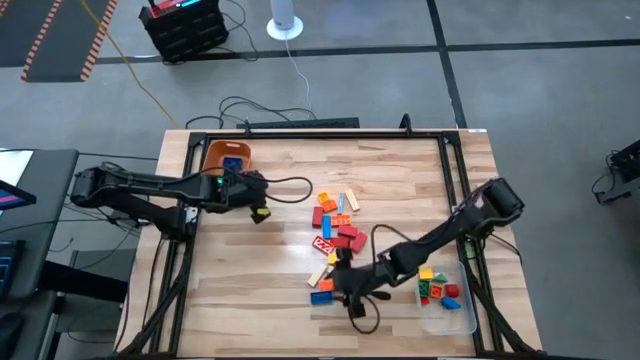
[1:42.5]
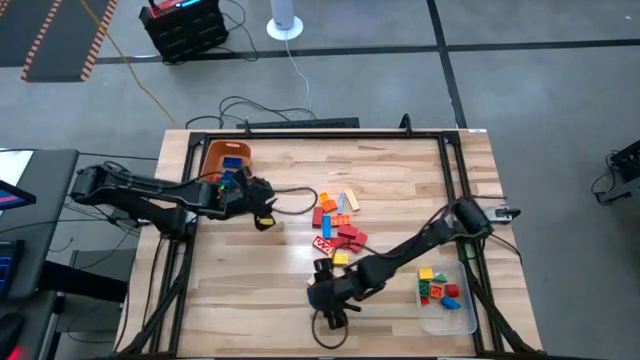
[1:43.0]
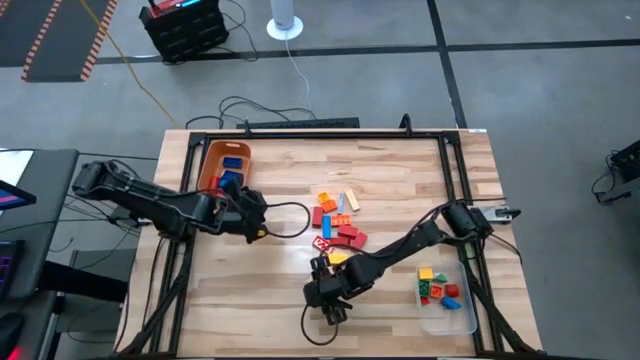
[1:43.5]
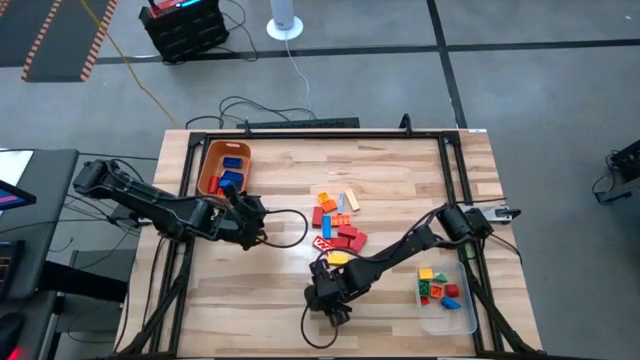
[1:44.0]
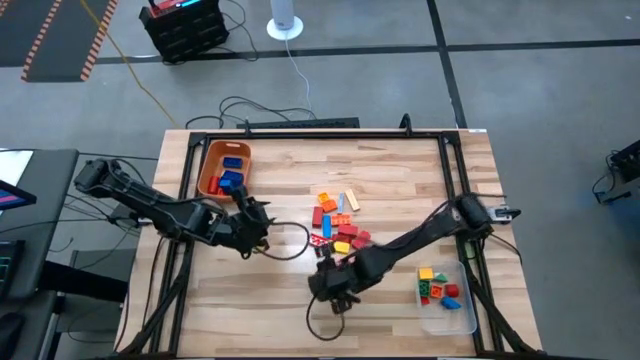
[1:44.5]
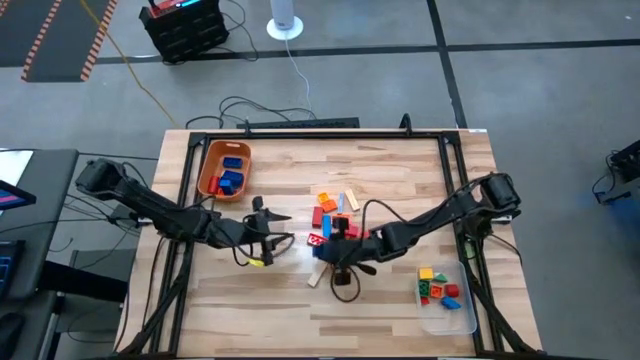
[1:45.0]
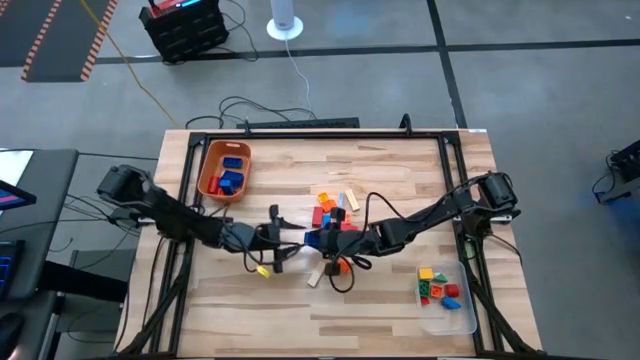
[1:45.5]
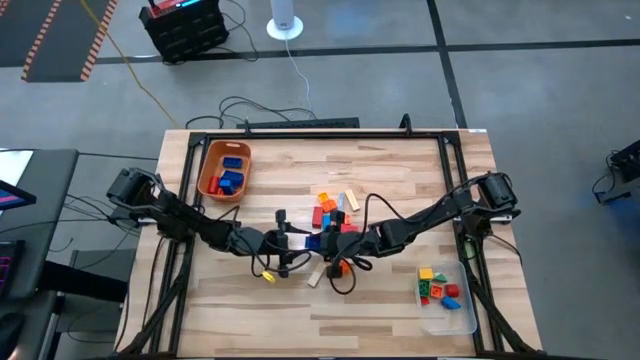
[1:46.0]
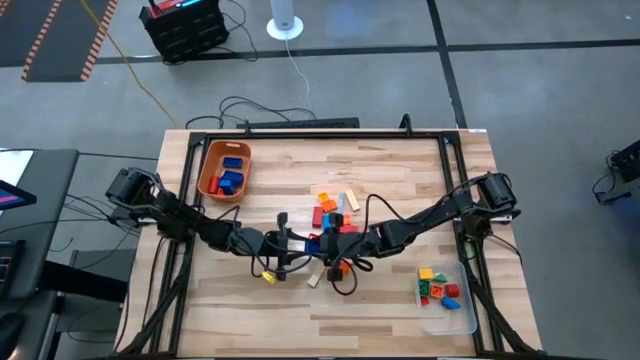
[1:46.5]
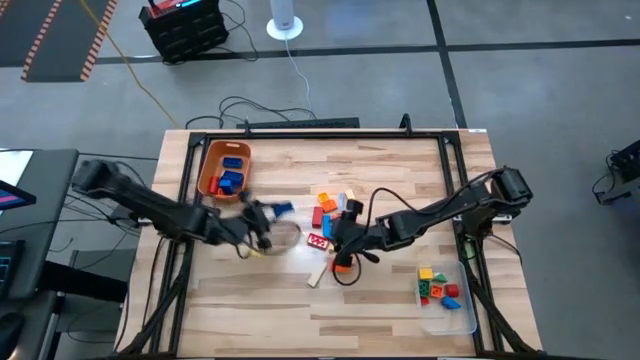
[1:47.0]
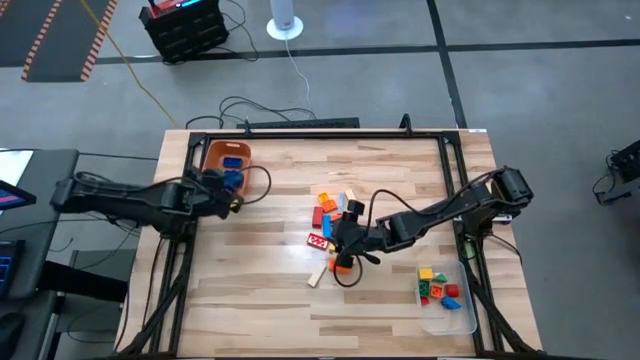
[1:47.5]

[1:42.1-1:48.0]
Task: Sort blocks by size
Put the large blue game piece into the orange bin

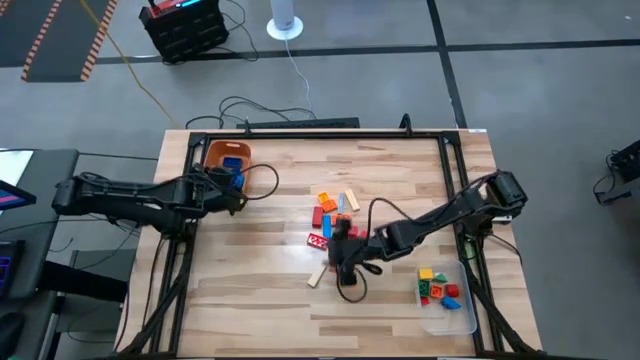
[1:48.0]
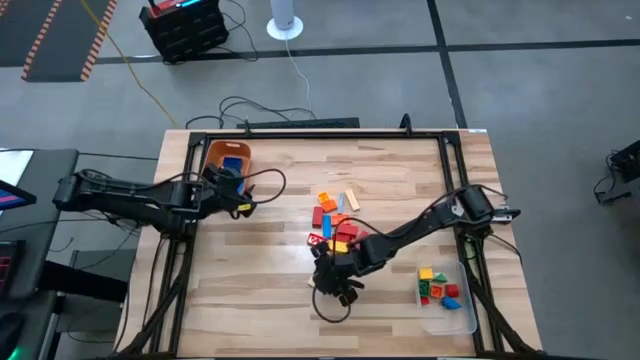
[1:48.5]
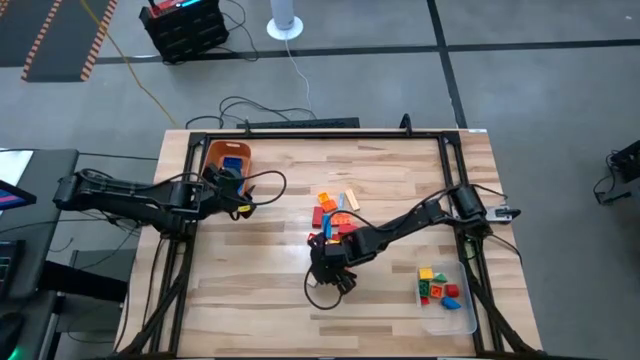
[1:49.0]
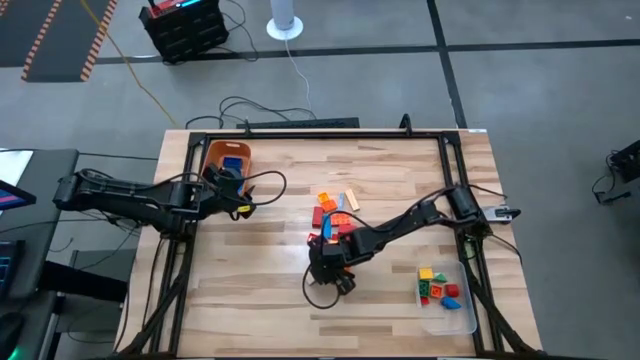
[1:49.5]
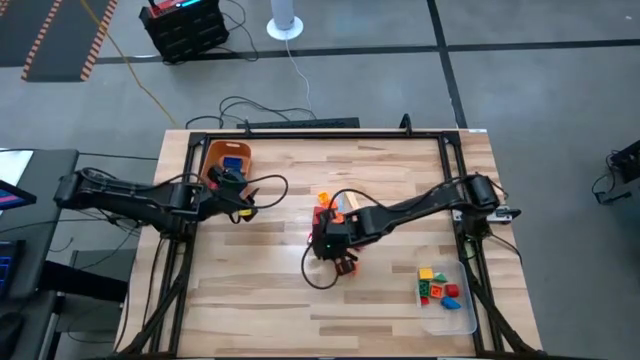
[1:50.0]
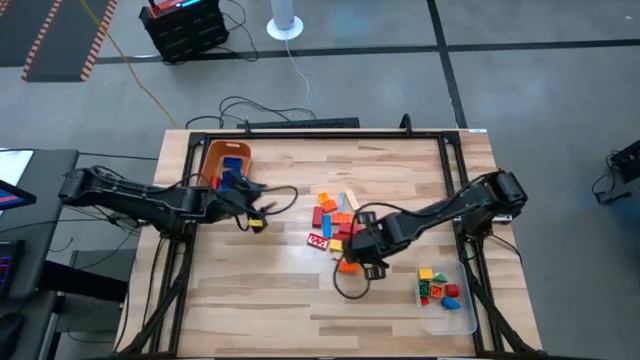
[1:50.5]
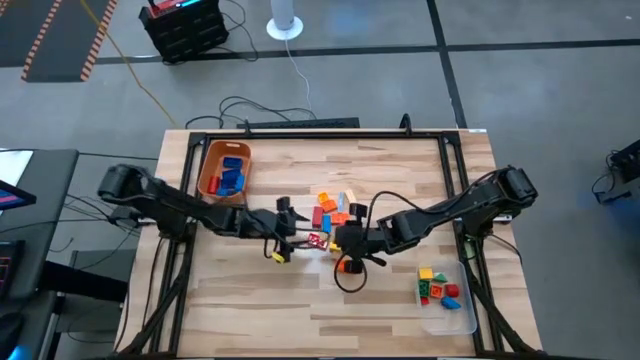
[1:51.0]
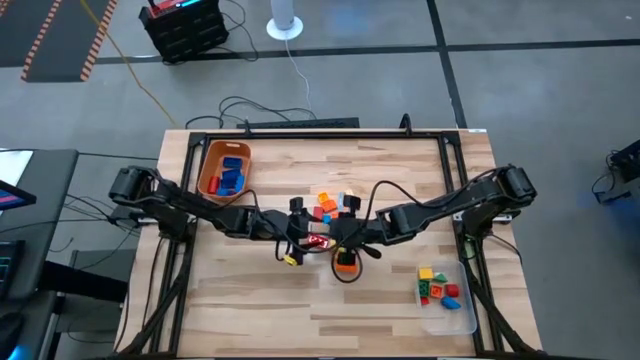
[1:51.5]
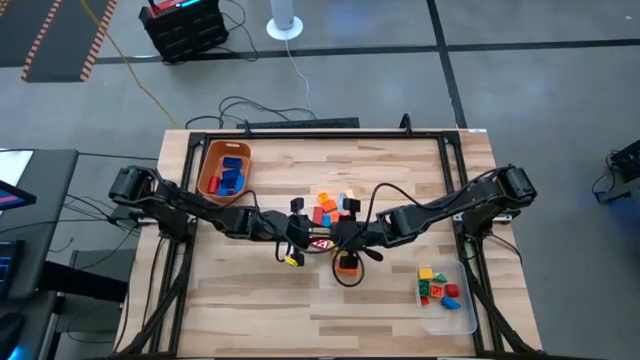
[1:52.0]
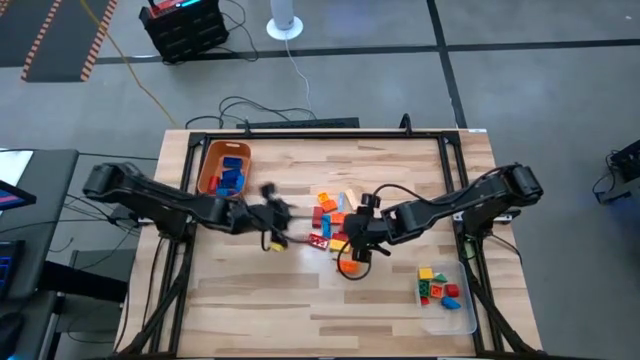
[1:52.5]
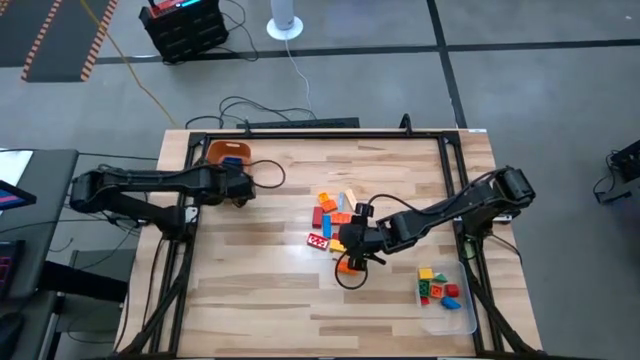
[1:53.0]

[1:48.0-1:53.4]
Put the large brown wooden block into the orange bin

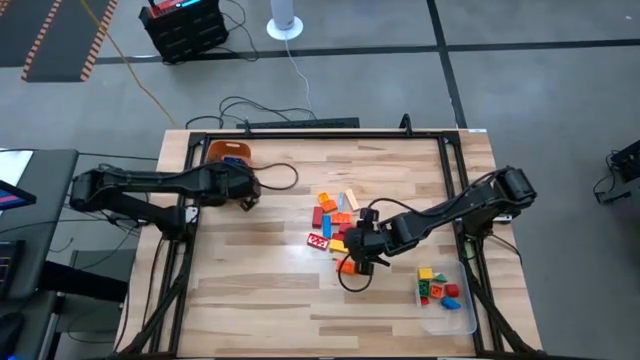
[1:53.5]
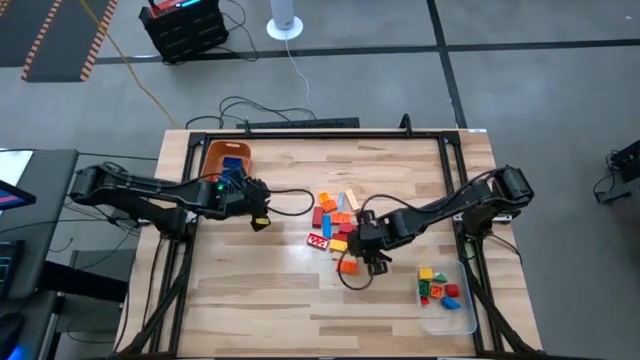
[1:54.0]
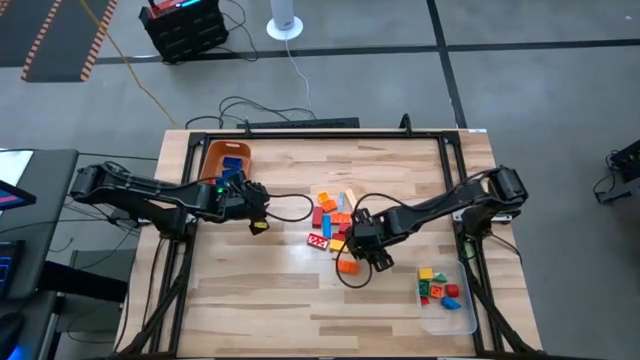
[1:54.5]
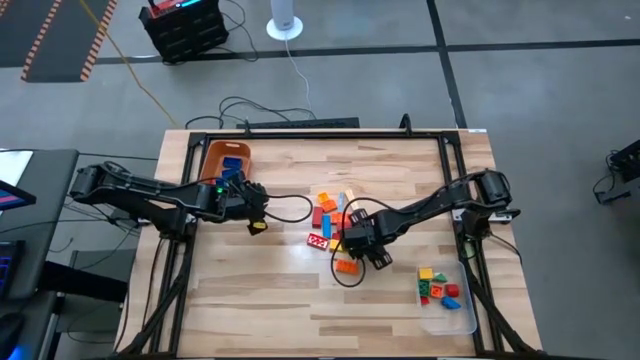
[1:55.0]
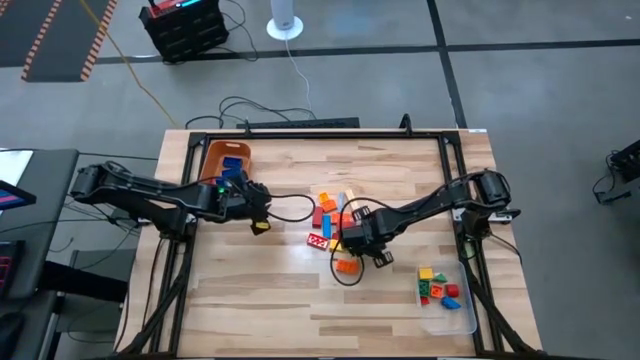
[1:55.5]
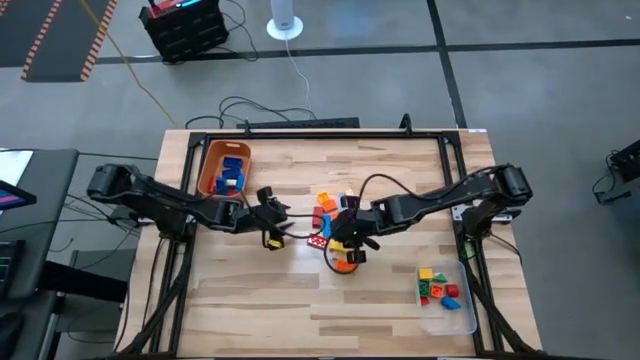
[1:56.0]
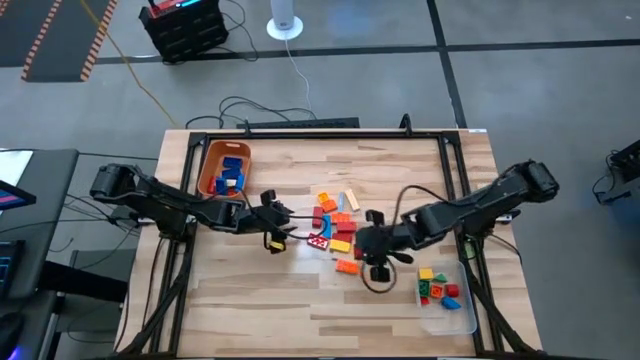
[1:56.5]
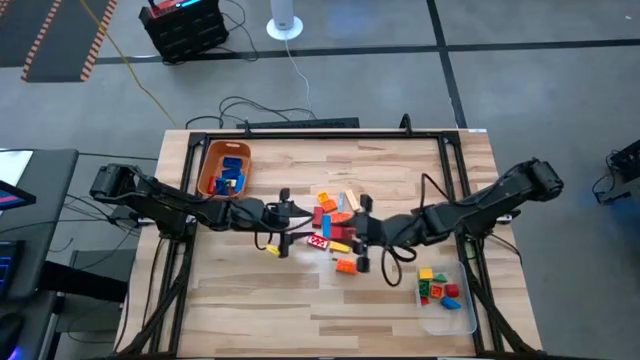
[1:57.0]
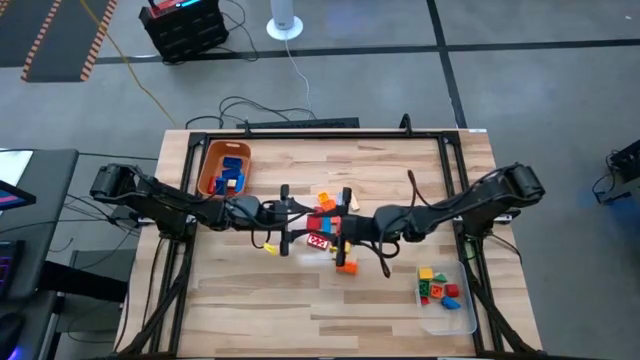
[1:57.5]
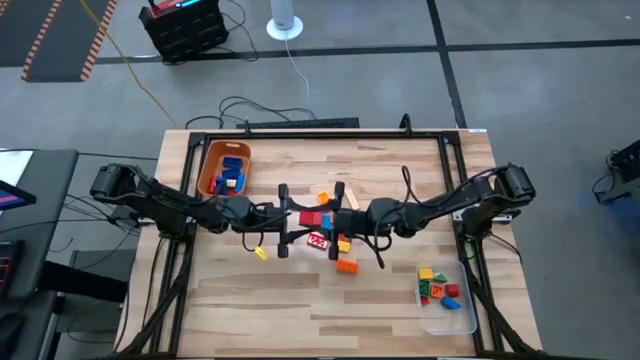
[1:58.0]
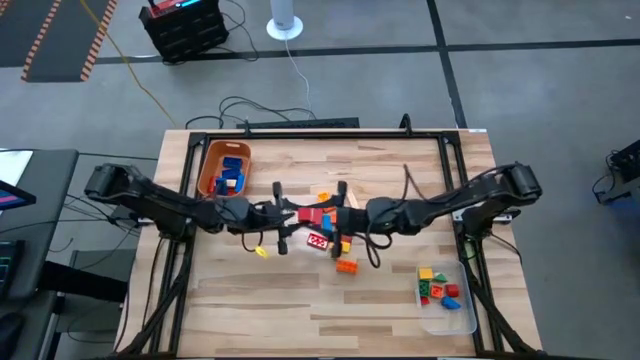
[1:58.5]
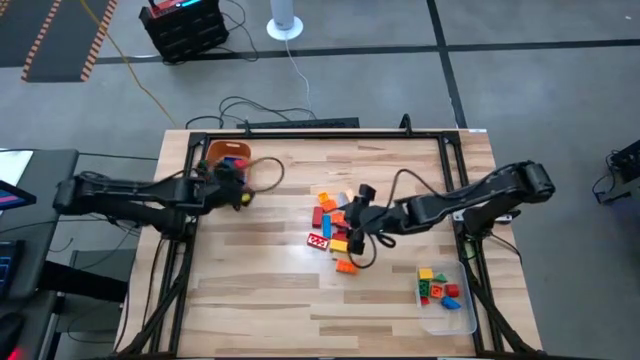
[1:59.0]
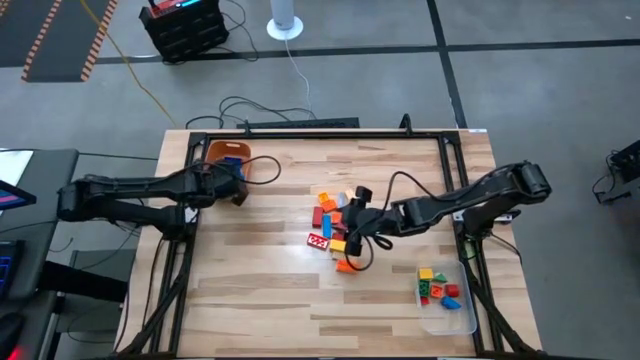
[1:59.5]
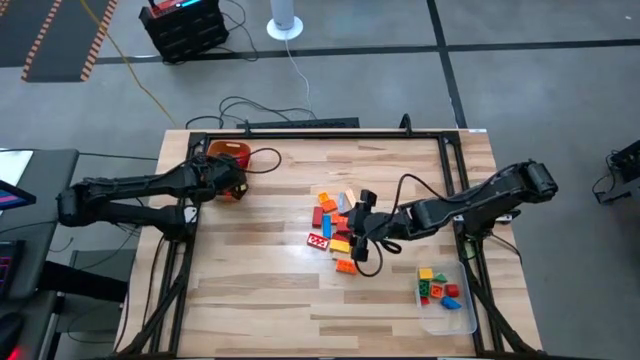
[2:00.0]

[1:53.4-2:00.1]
Put the large red wooden block into the orange bin

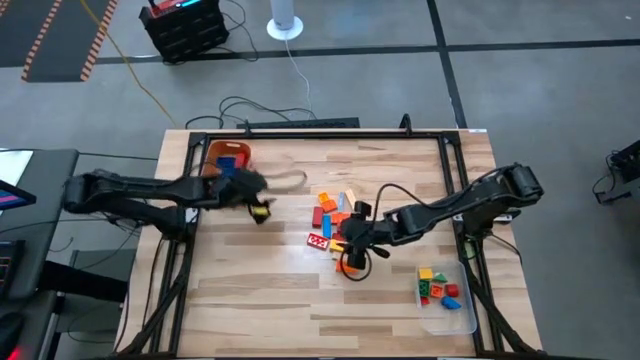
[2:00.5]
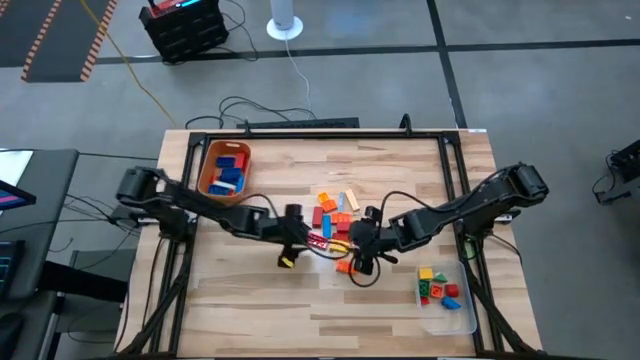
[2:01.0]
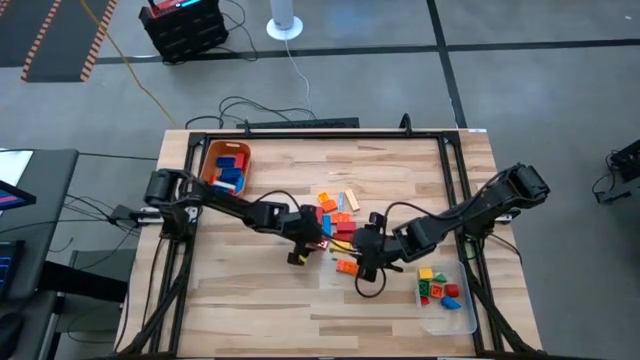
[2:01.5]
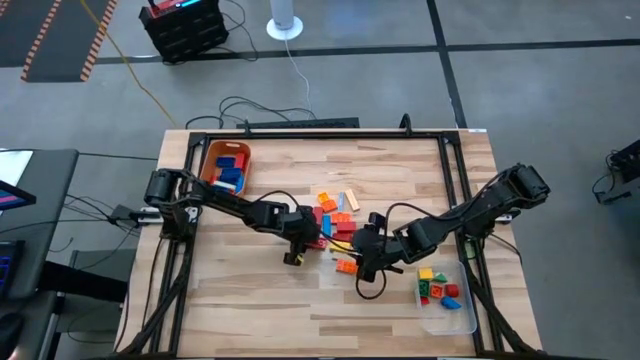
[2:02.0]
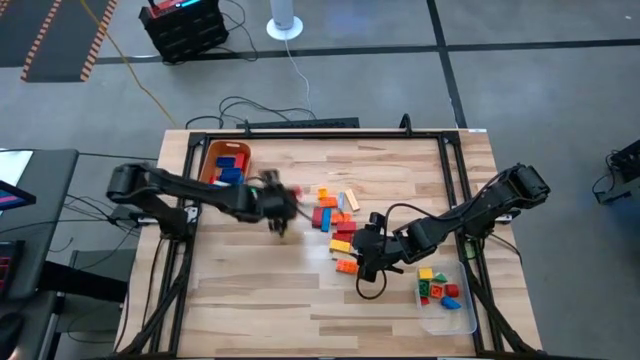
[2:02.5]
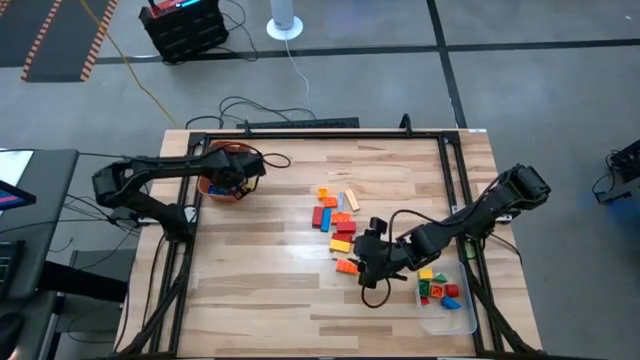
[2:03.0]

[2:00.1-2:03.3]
Put the large orange game piece into the orange bin

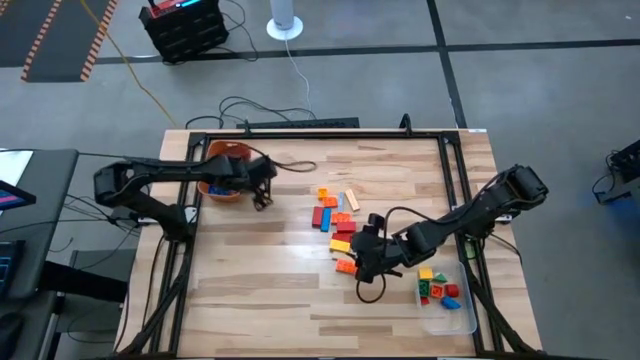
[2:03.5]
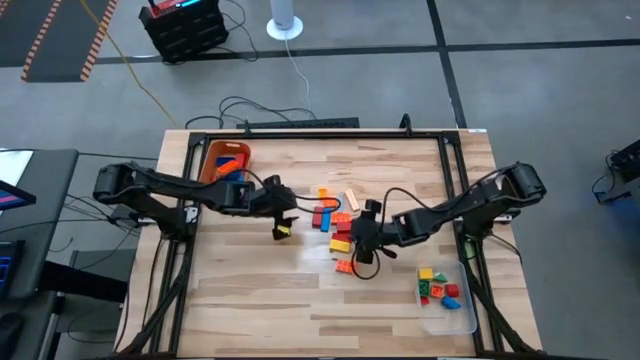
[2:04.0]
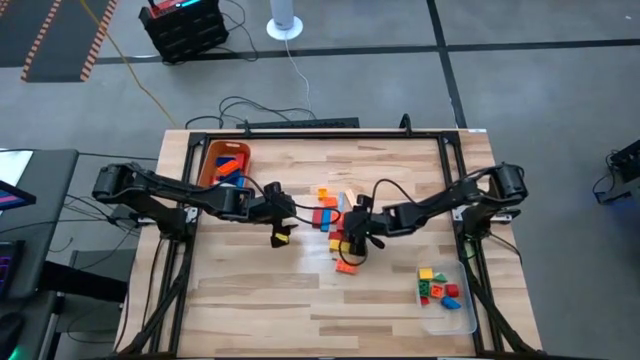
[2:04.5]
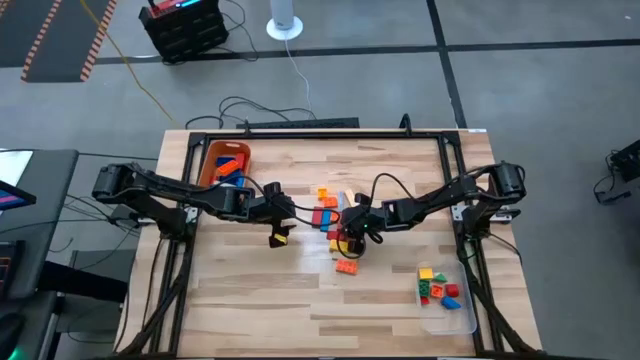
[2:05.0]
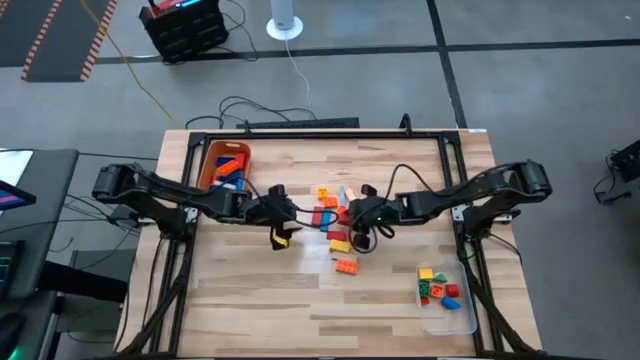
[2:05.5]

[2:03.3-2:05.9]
Put the large red wooden block into the orange bin
